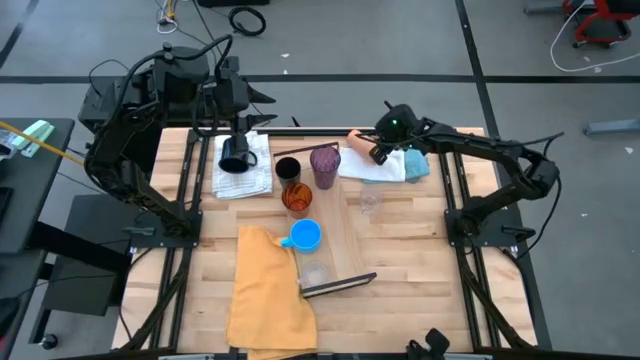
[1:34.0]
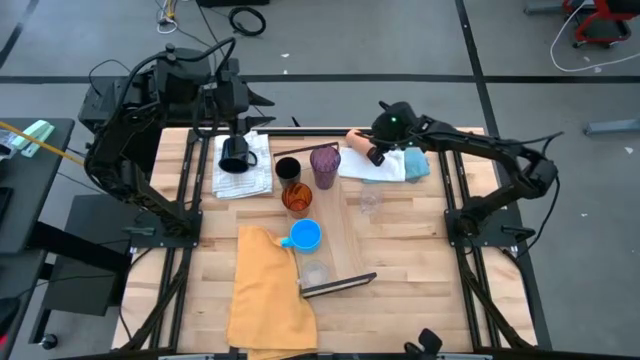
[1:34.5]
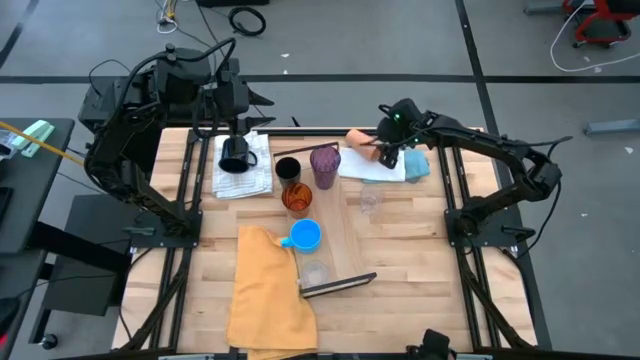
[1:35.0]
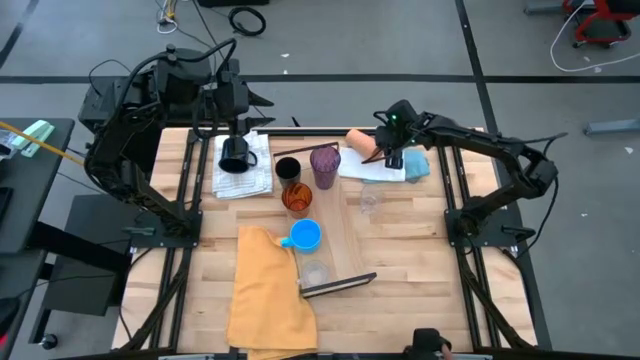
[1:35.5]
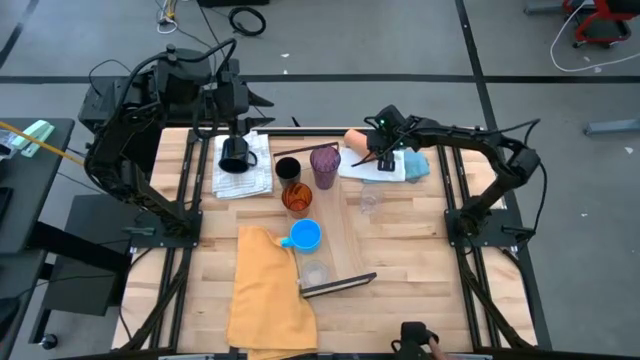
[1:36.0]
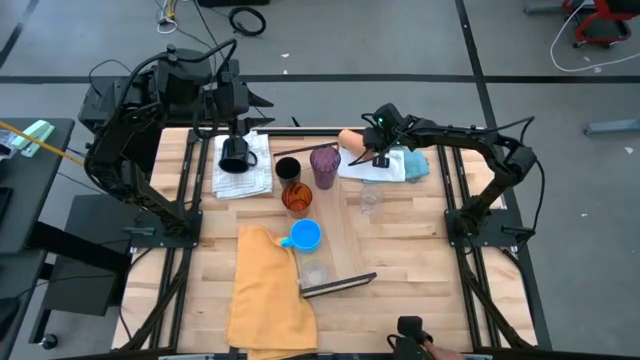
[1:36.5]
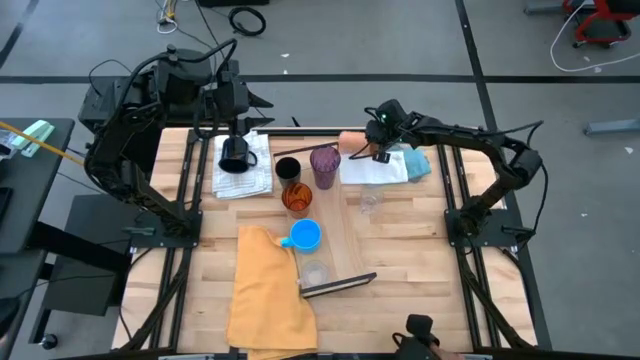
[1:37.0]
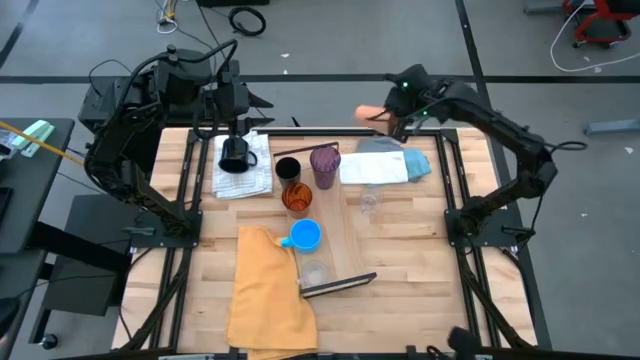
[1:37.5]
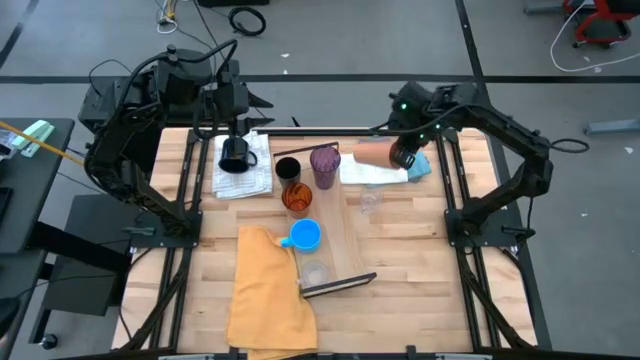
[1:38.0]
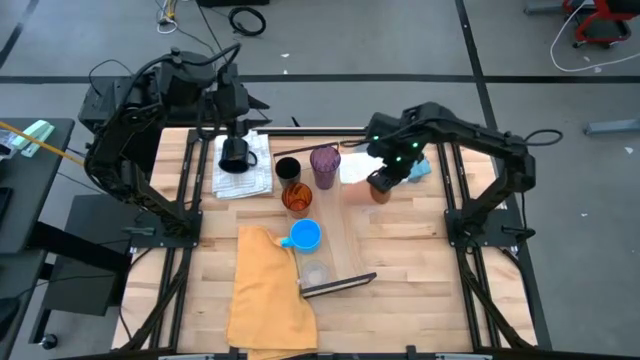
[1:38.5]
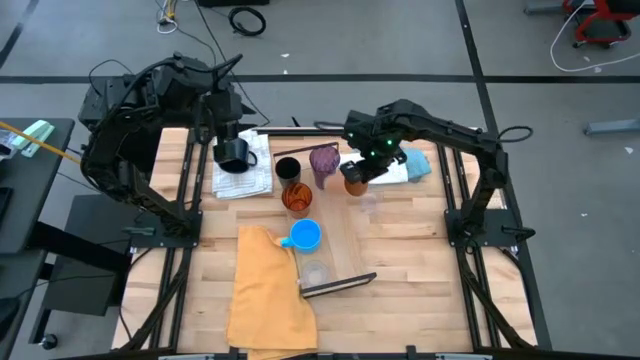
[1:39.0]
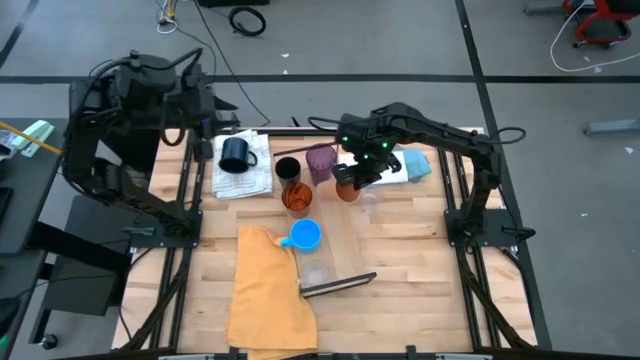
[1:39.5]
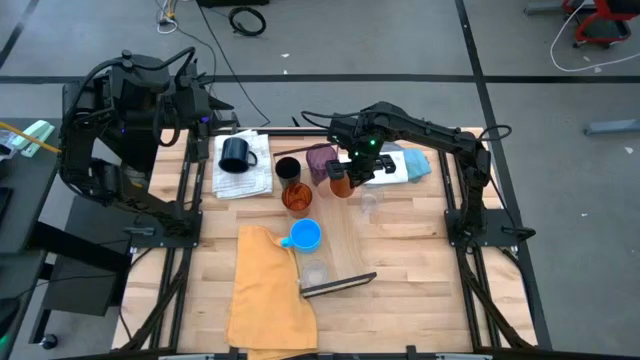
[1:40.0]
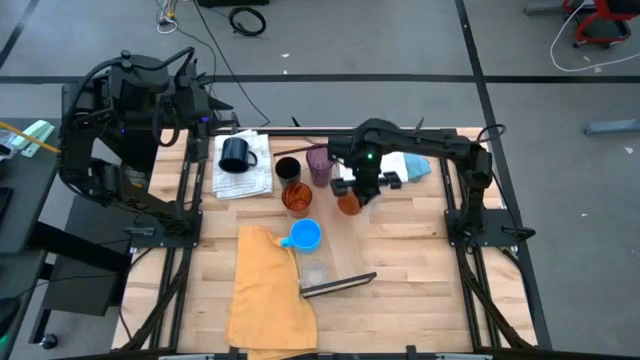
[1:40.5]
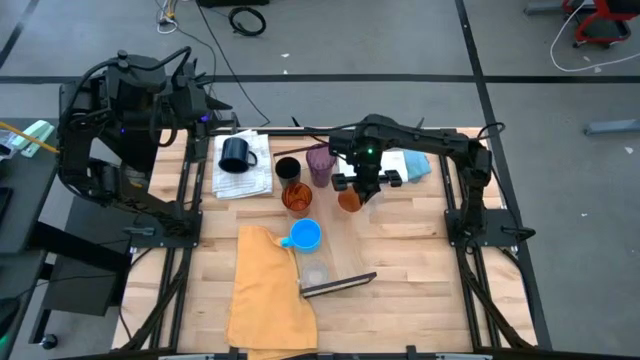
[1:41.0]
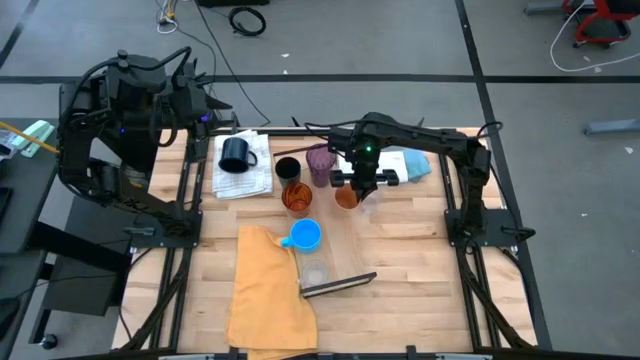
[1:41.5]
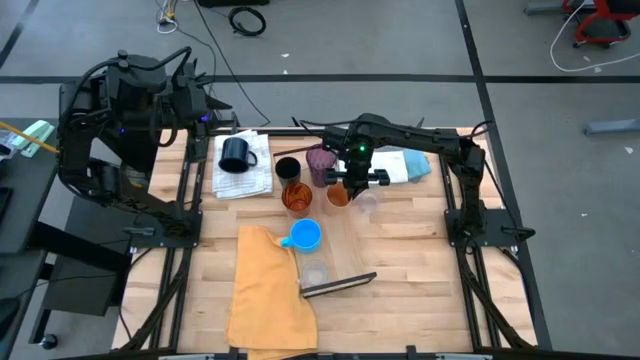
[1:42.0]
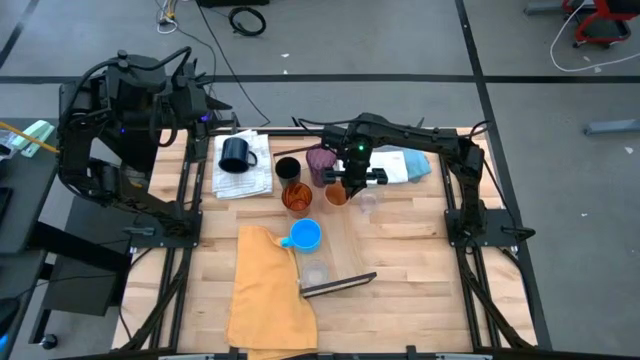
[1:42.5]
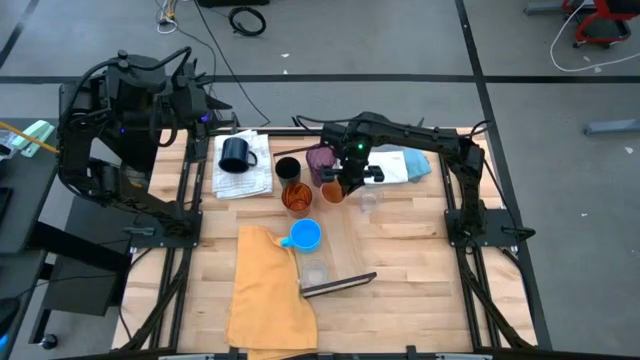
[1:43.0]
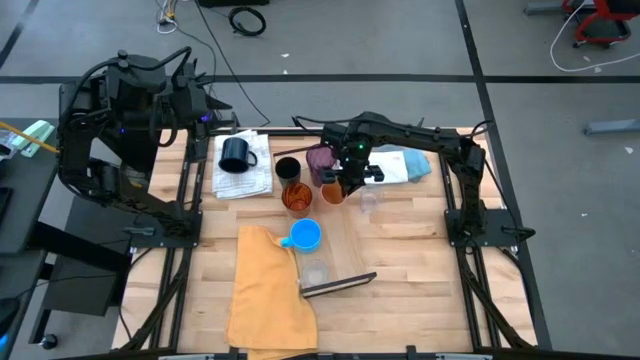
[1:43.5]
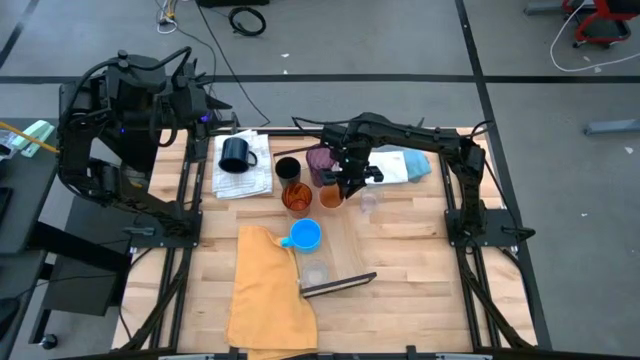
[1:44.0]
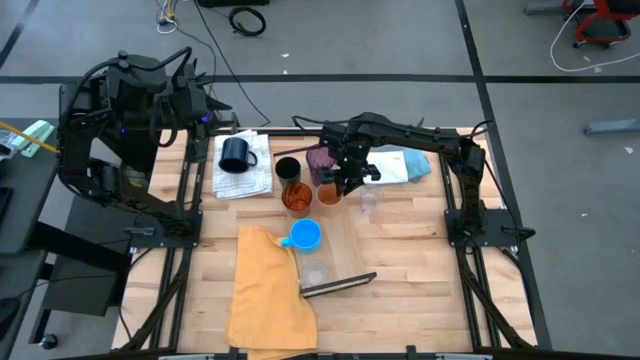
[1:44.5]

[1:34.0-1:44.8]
Task: Stack small to large cups/mugs on shelf
Put the light orange cup on the shelf

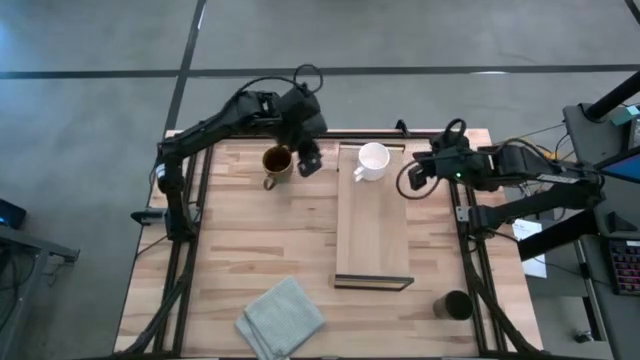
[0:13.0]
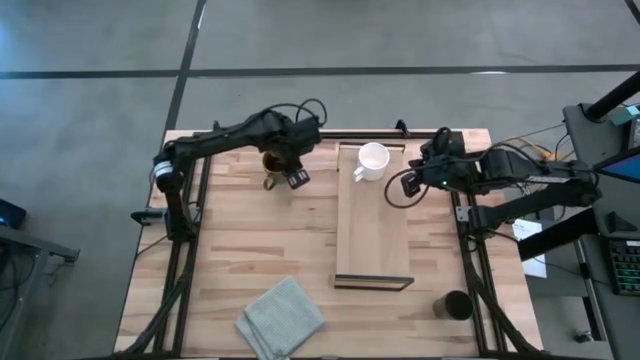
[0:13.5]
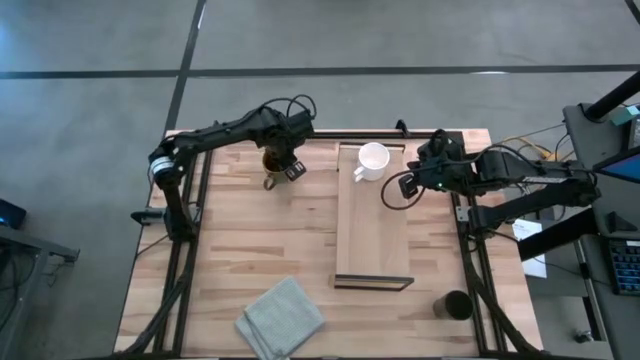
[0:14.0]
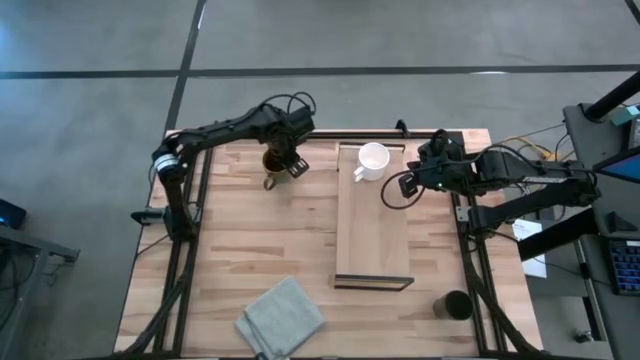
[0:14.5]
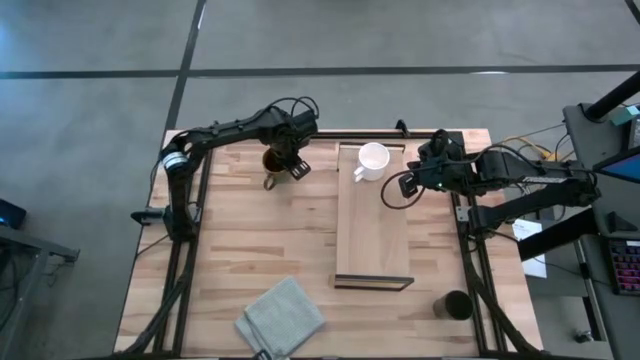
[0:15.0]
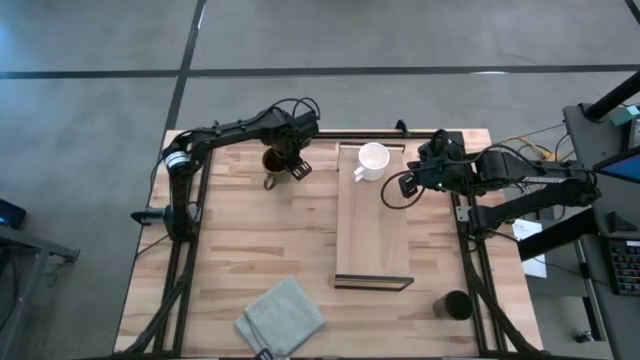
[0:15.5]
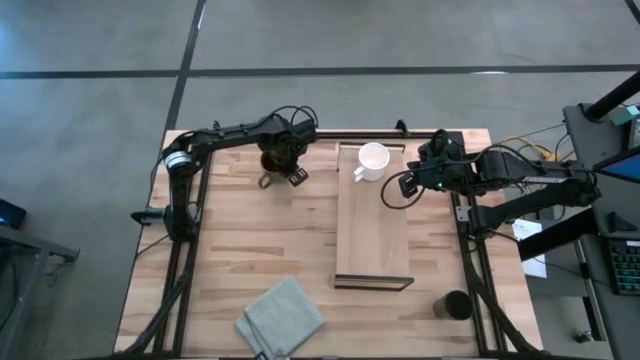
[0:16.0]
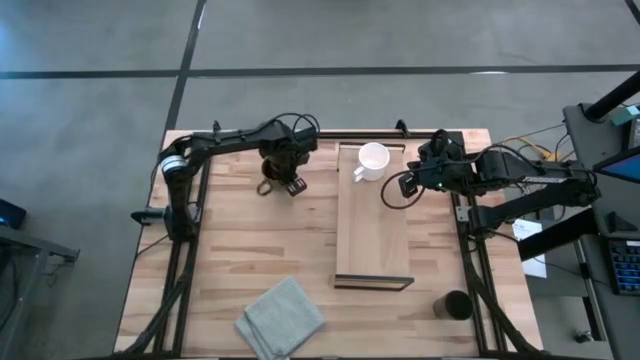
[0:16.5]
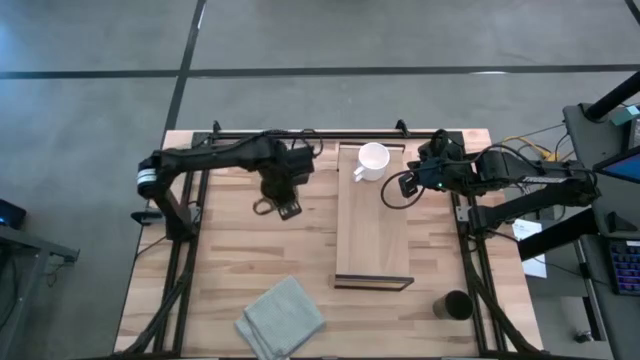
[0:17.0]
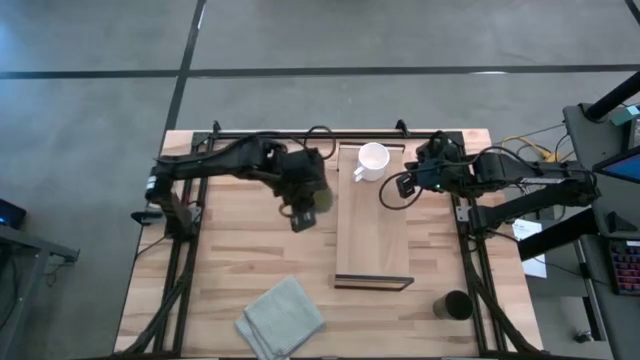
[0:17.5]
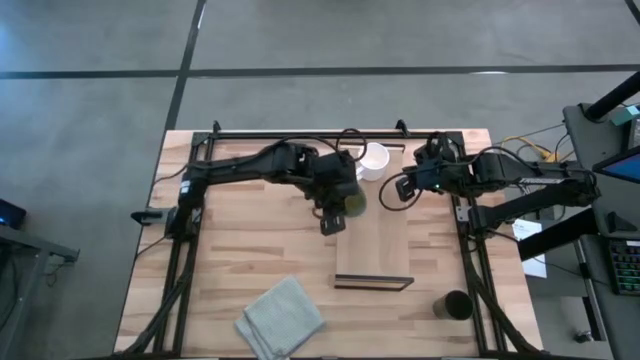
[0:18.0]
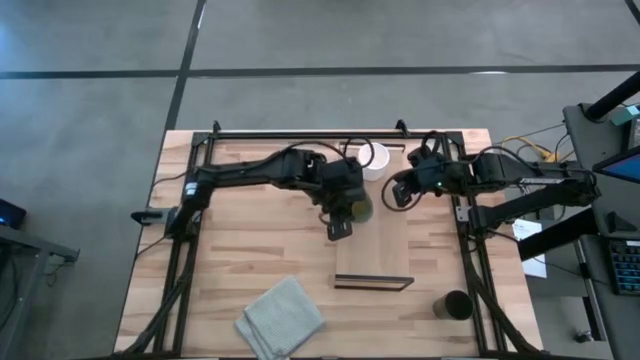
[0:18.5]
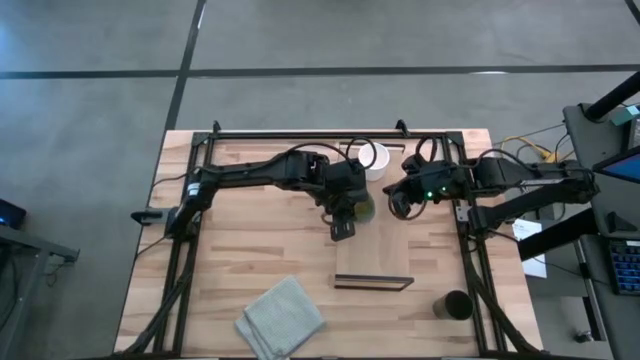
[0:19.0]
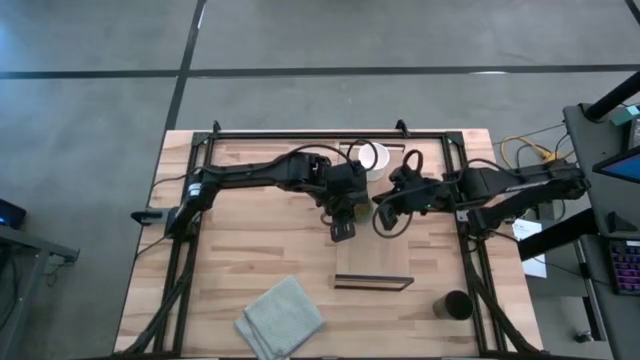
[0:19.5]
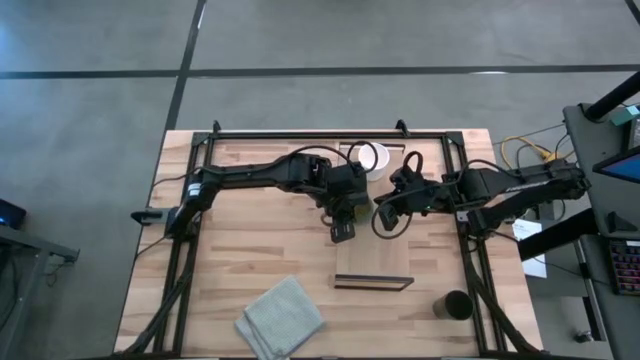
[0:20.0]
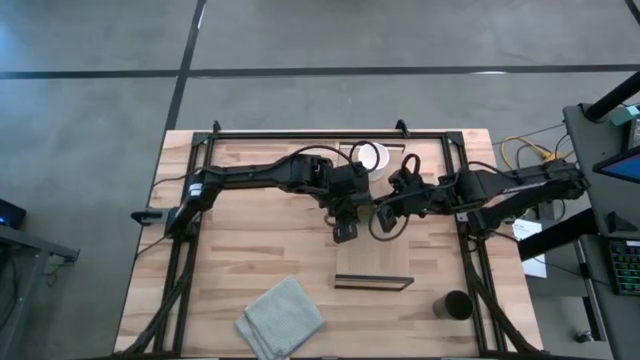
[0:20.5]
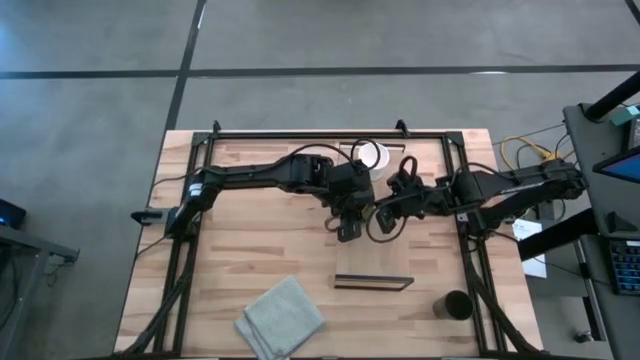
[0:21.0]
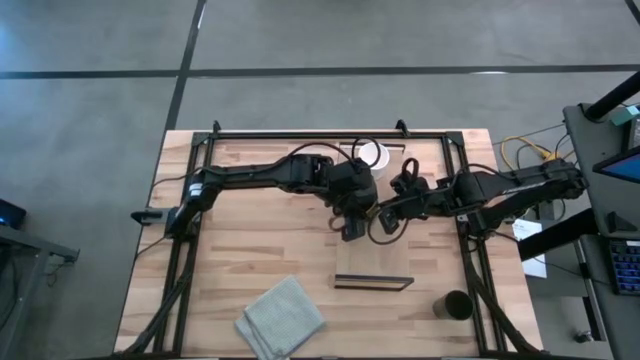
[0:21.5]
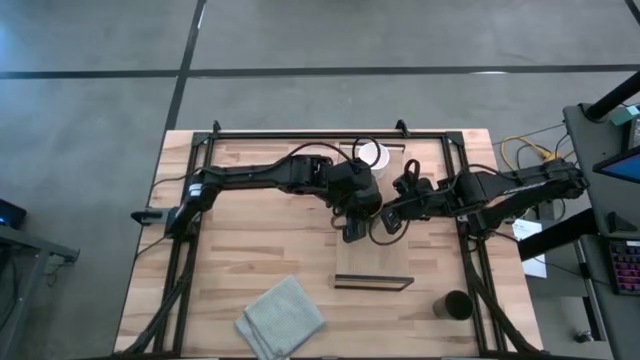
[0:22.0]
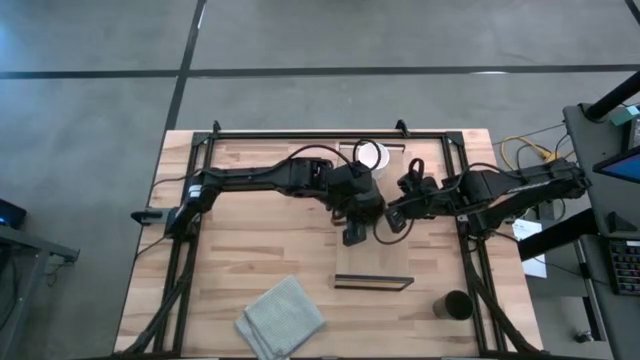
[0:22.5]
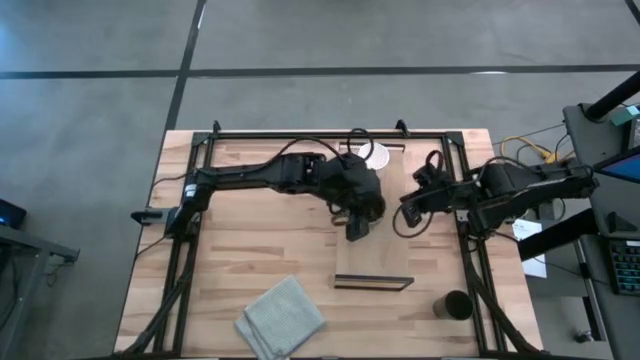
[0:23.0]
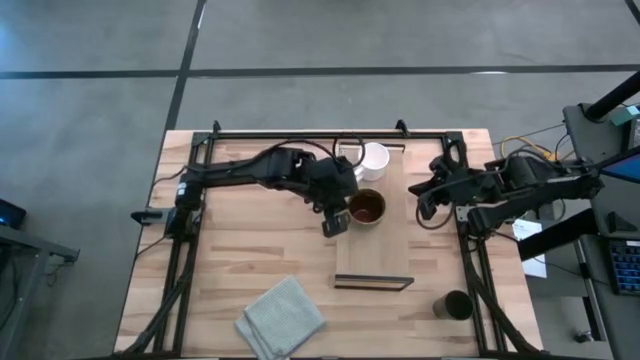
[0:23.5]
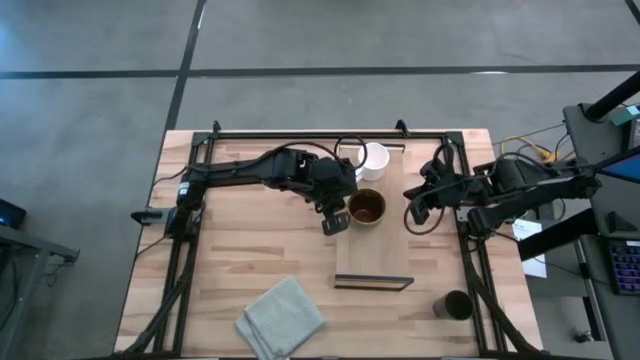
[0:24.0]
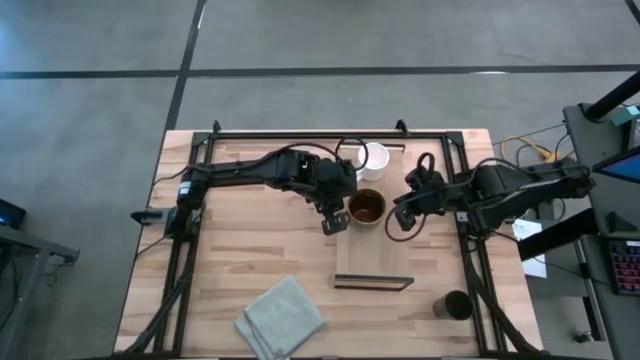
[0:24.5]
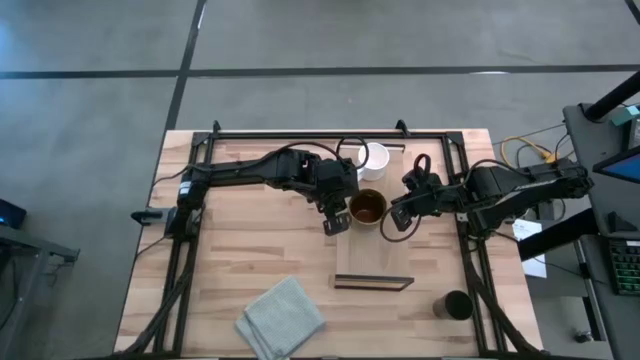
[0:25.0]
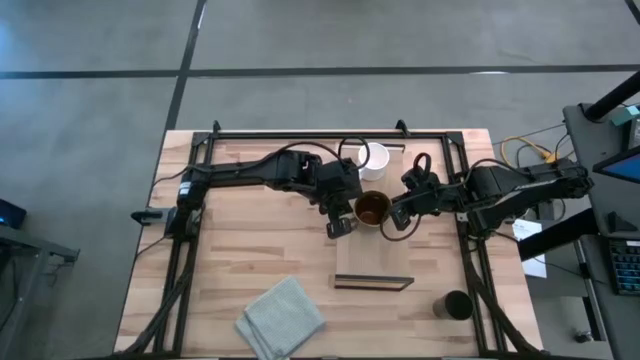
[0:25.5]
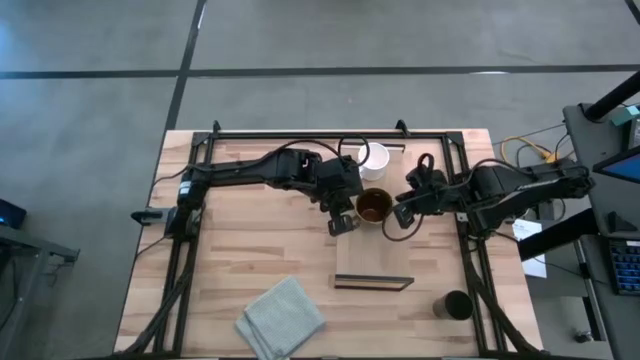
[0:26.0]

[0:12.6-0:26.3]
Task: Stack small to large cups/mugs on shelf
Put the green and blue mug on the shelf
